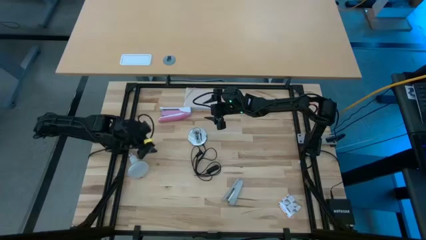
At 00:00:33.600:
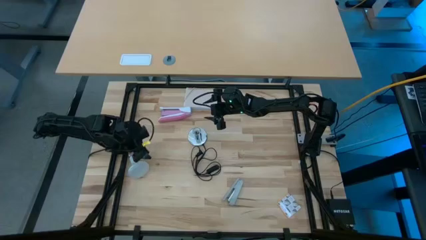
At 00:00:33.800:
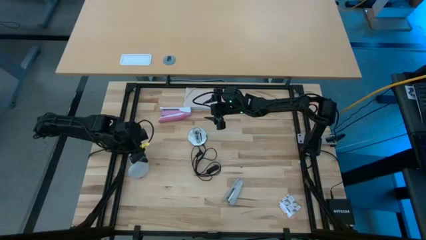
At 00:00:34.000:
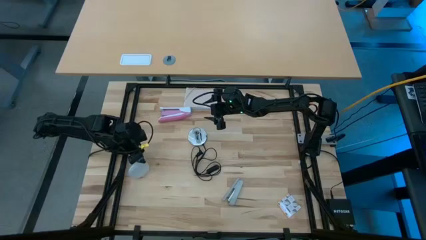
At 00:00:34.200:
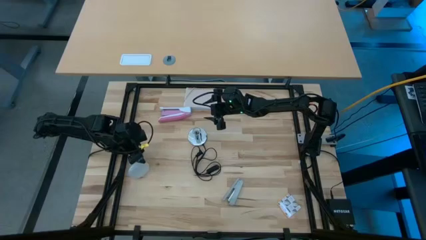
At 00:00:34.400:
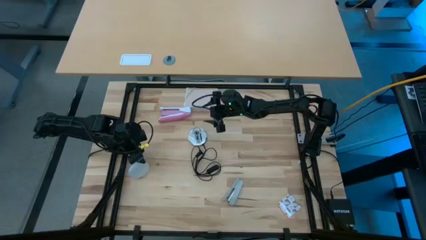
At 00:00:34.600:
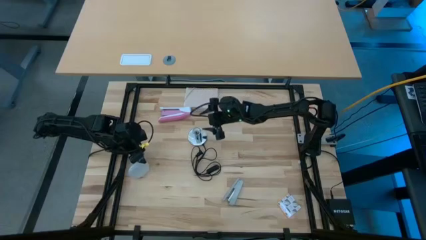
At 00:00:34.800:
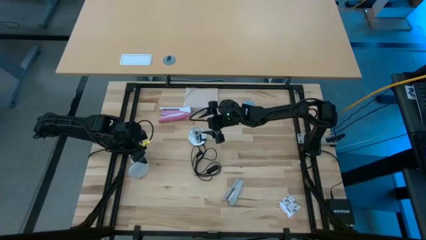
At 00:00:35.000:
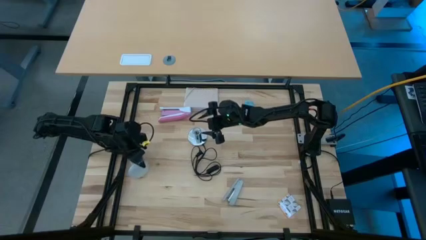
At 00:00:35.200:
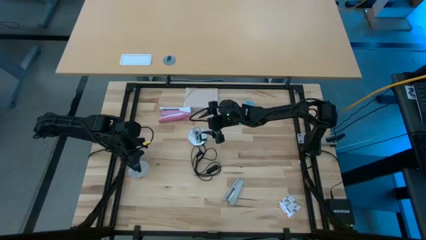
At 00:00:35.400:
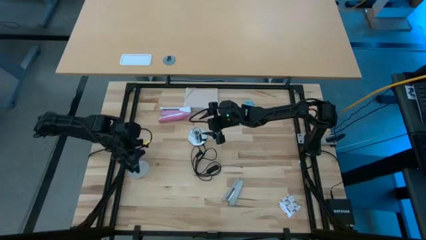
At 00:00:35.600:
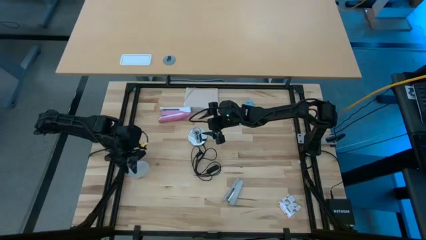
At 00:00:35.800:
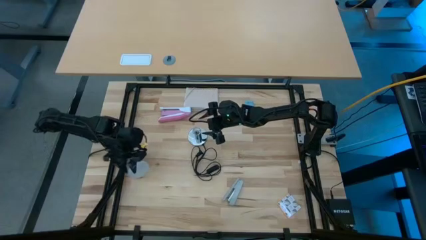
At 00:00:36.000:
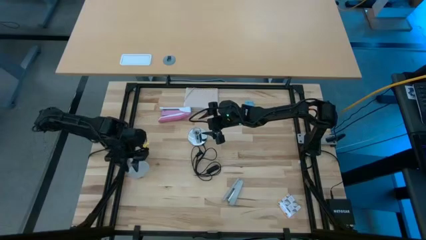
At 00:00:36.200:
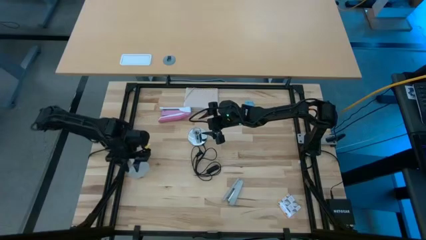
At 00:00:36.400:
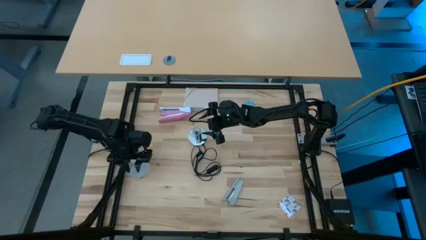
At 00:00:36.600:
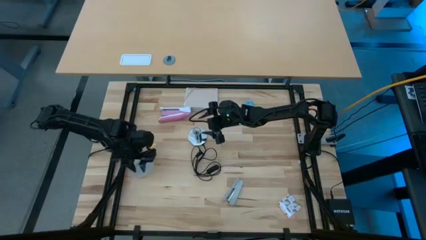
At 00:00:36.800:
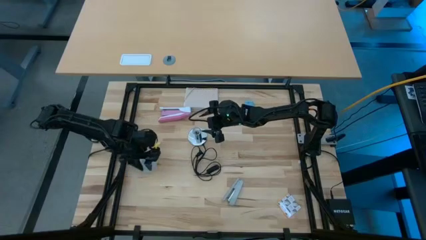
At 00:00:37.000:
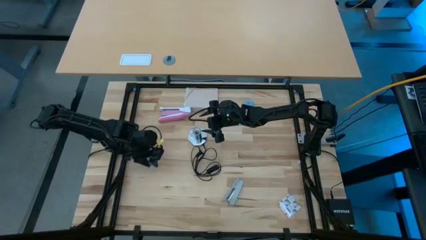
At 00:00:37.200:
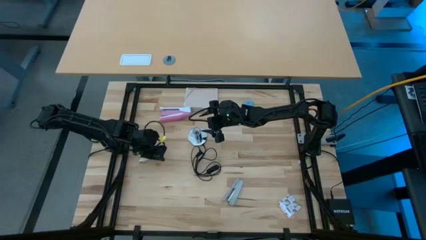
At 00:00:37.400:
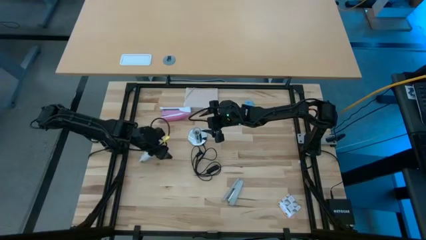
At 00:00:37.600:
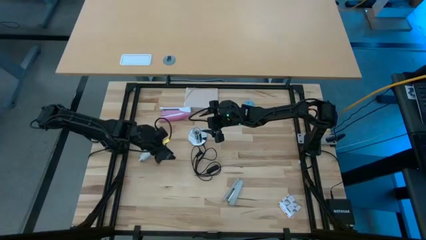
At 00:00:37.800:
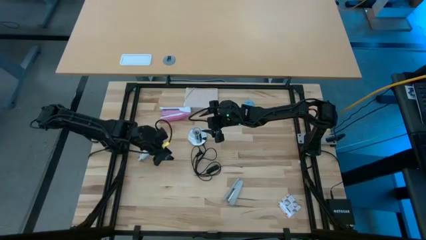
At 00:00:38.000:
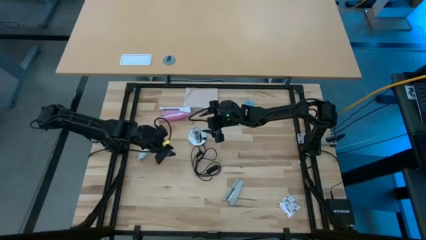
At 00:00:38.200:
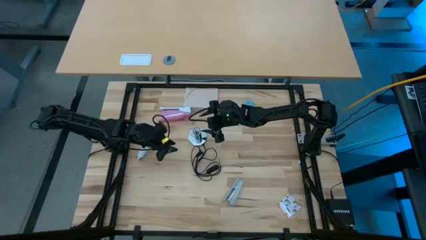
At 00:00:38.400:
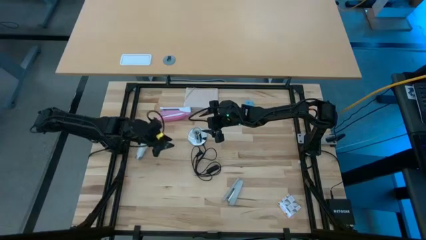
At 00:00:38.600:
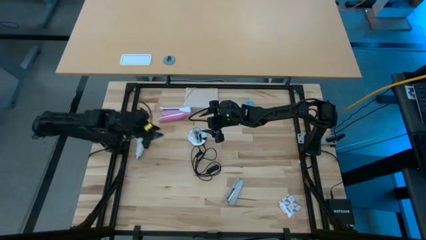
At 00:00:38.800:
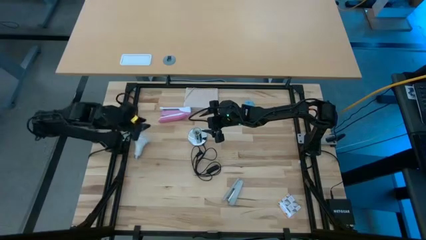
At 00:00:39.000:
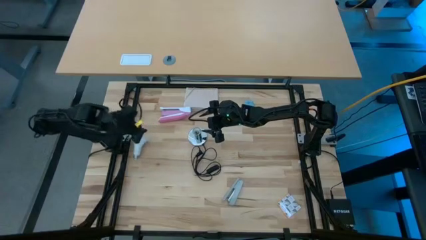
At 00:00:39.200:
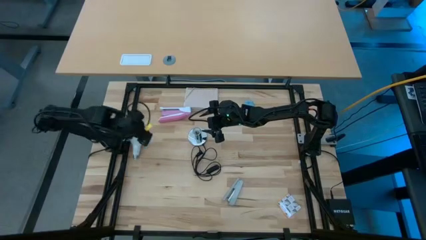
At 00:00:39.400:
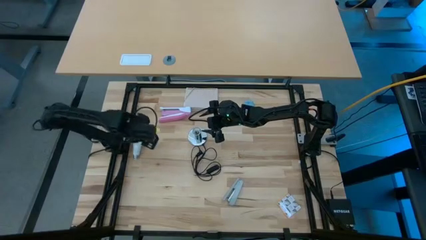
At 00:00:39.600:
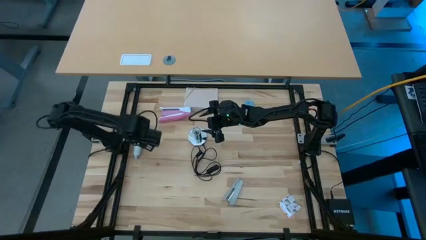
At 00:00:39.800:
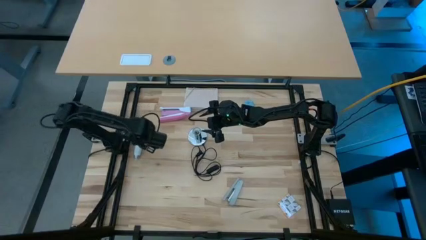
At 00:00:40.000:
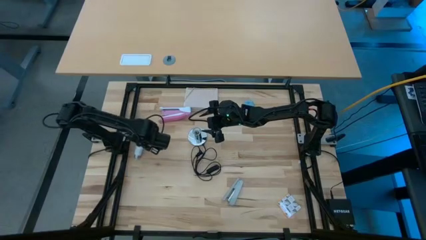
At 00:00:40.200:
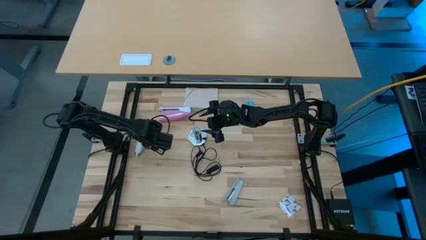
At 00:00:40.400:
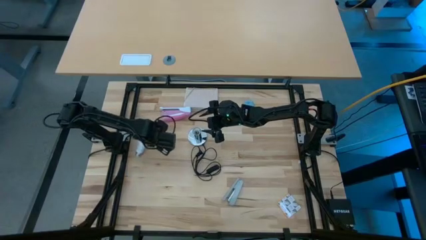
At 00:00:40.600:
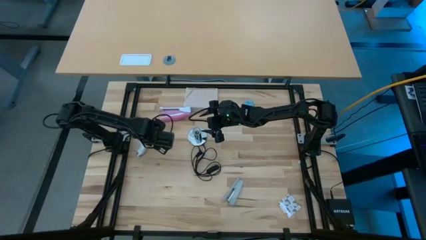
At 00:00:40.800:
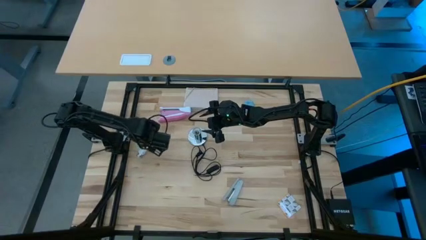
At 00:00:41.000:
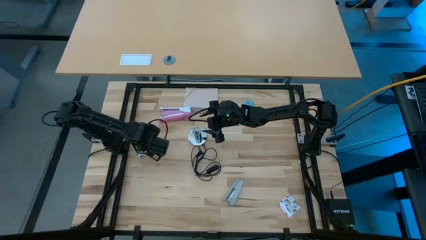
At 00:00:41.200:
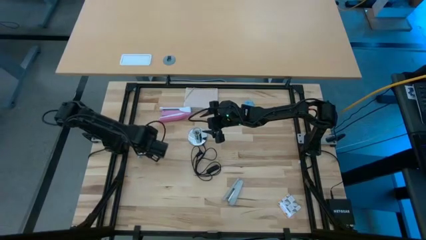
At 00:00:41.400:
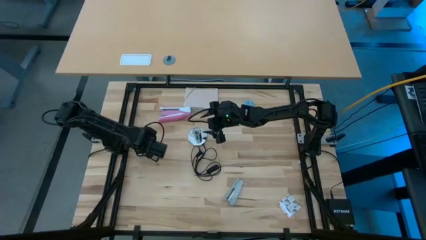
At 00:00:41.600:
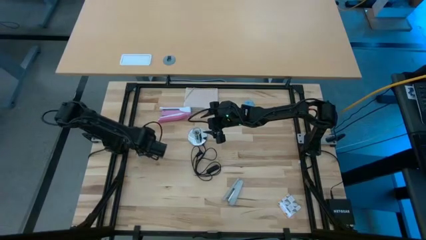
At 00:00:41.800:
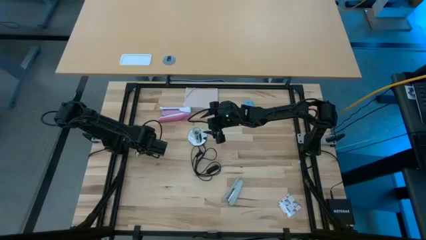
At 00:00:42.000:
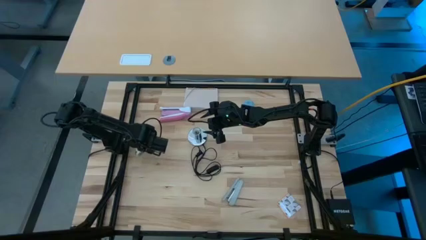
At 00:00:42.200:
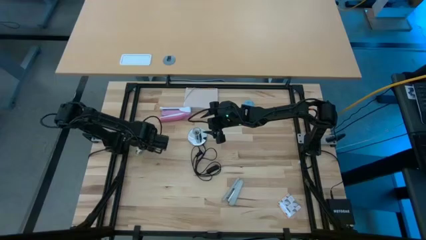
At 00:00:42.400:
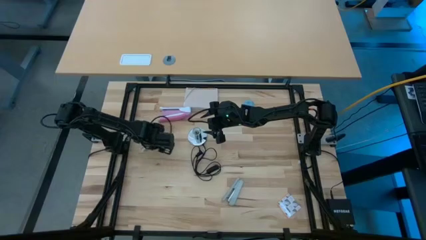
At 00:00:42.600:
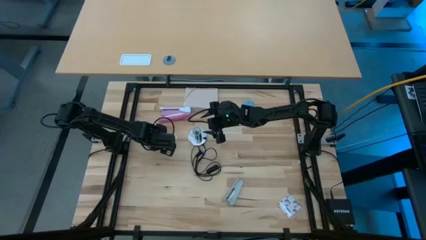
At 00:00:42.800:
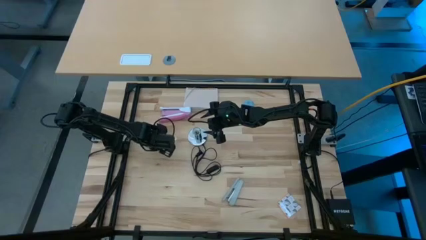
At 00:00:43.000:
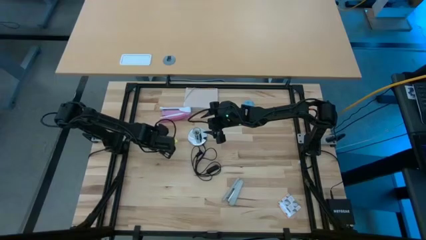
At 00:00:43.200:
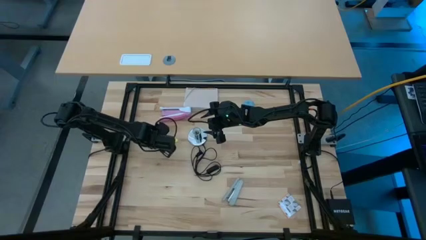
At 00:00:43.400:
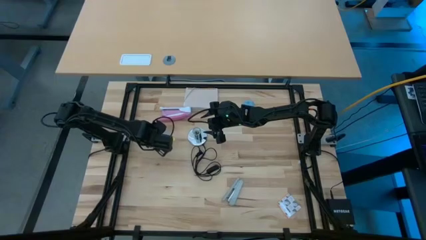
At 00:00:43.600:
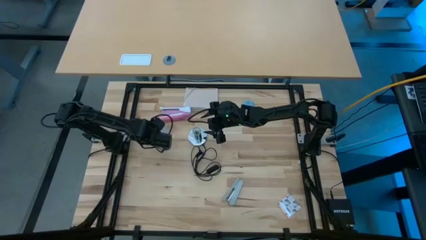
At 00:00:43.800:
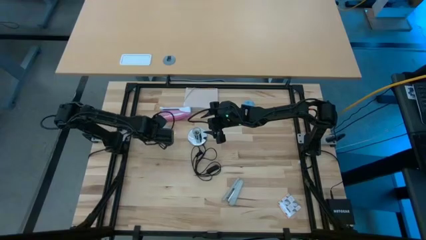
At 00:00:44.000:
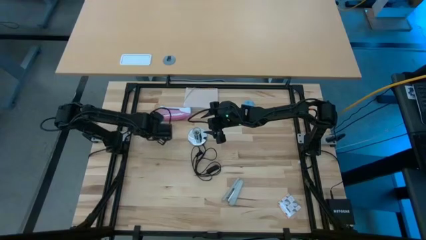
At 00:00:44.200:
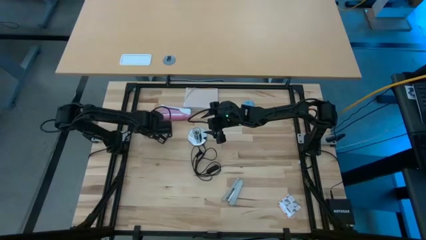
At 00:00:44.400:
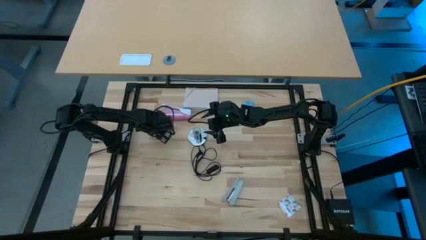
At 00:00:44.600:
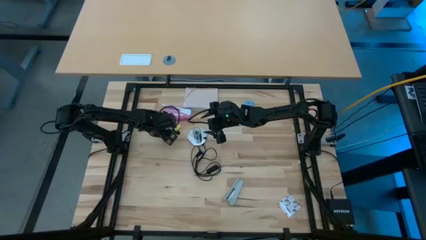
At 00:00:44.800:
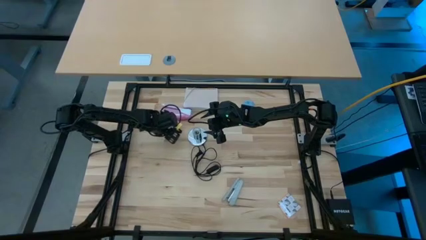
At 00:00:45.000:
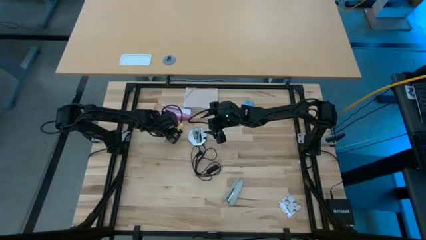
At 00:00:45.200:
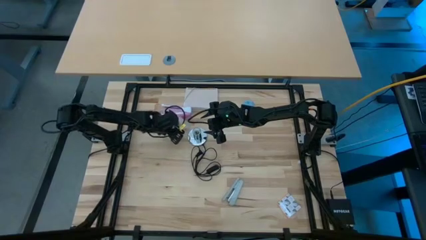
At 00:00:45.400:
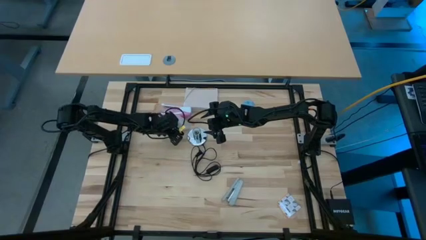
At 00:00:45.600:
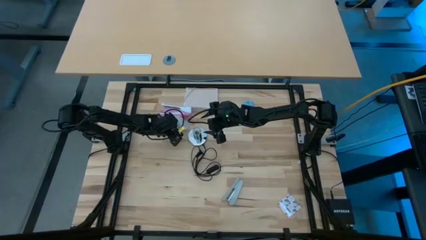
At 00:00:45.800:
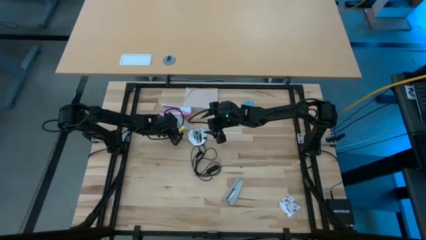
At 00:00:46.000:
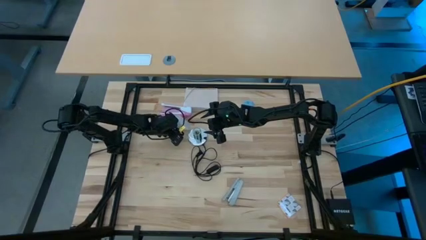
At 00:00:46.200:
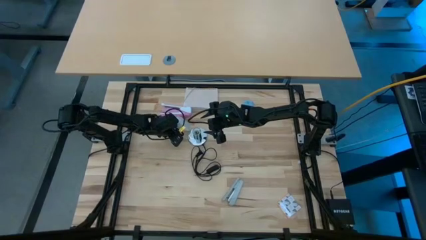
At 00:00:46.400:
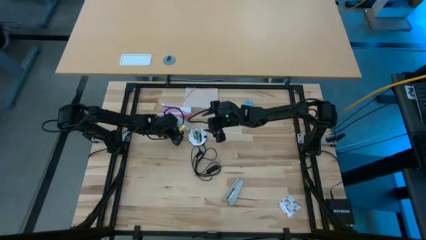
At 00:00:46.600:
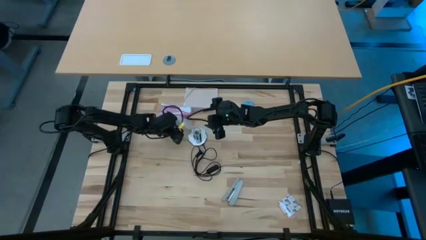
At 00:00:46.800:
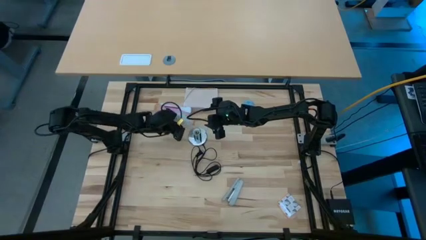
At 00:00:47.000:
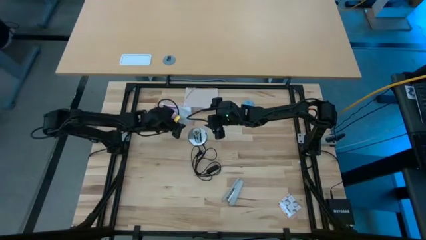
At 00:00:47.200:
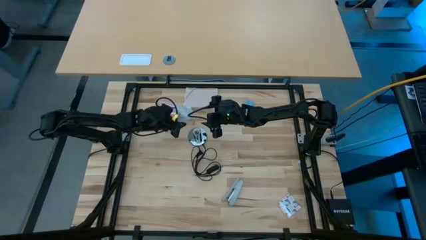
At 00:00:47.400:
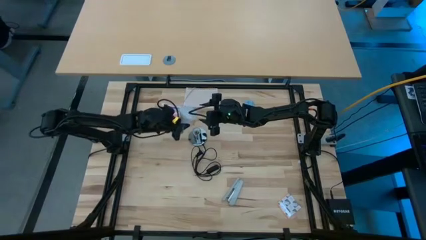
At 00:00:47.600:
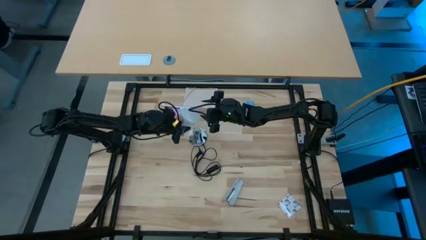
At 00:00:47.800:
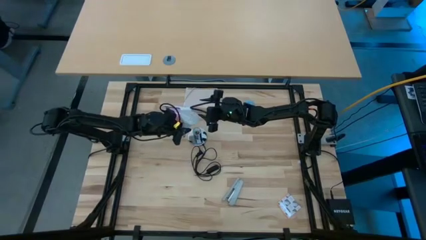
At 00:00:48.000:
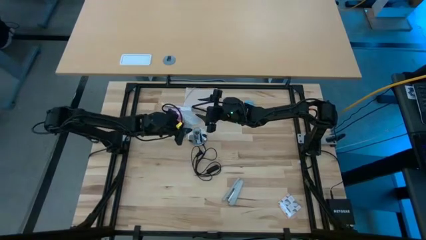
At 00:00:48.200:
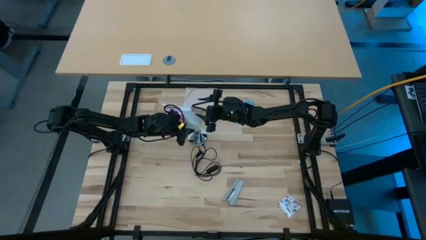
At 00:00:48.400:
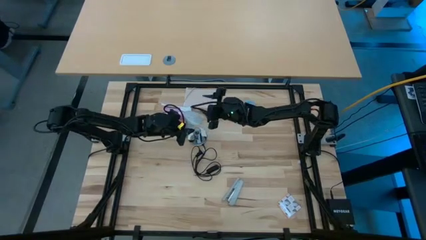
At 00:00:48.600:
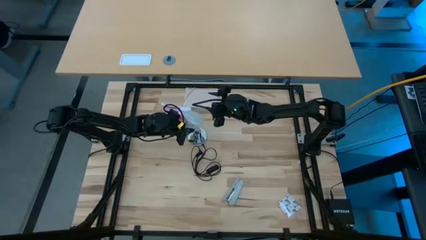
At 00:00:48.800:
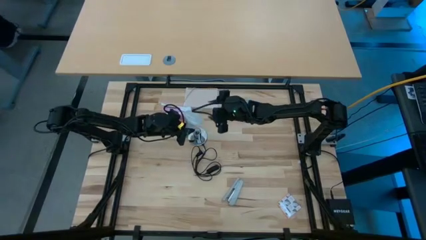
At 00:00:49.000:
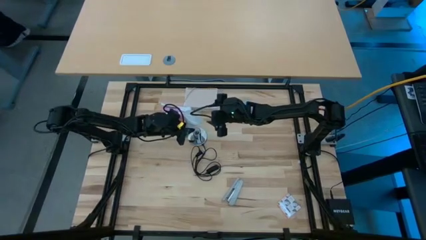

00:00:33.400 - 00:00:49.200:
Task: Screw lightbulb
Insert light bulb into the lamp
